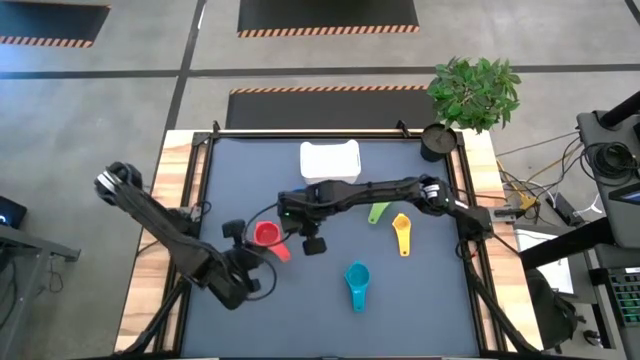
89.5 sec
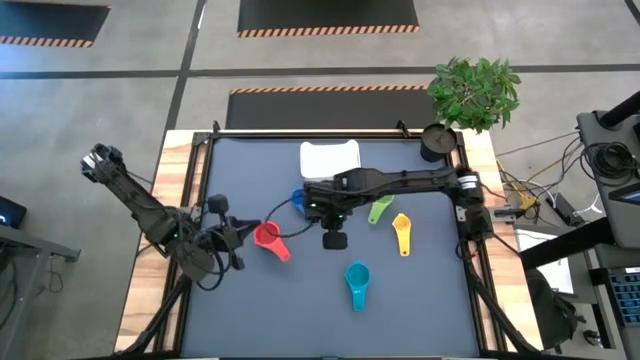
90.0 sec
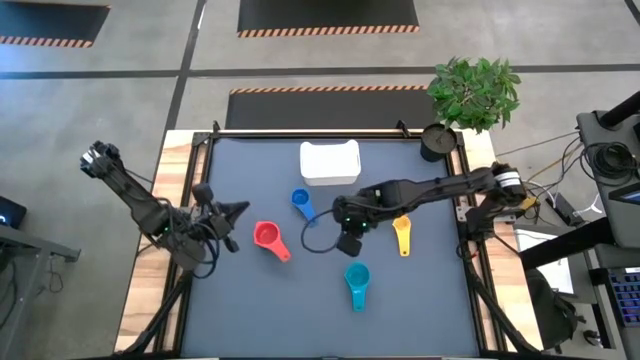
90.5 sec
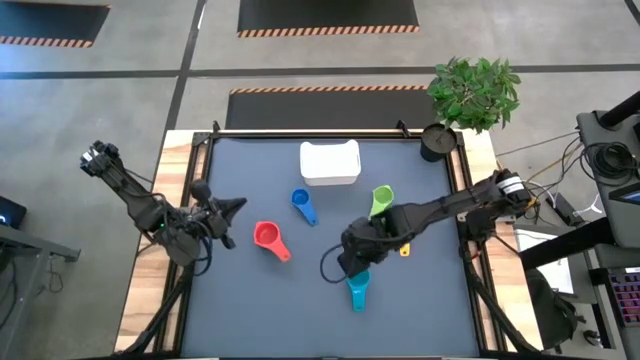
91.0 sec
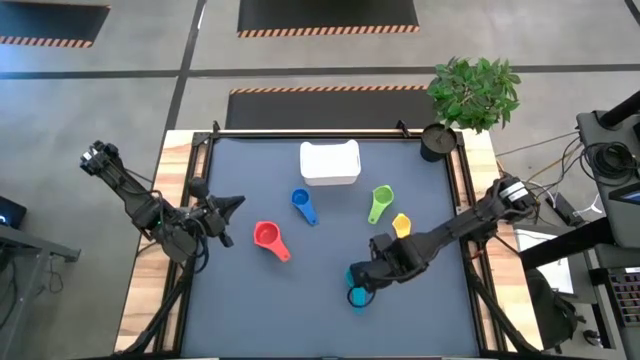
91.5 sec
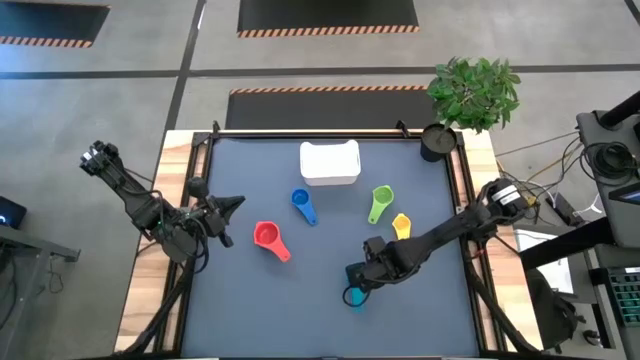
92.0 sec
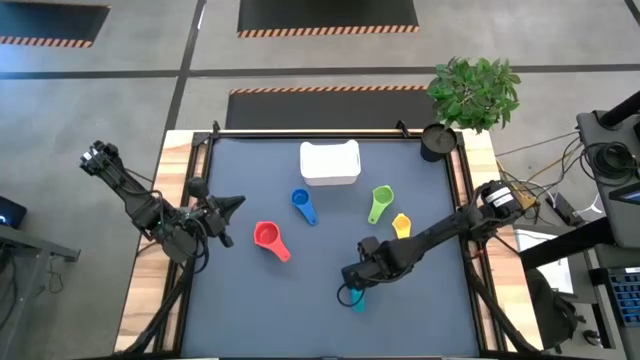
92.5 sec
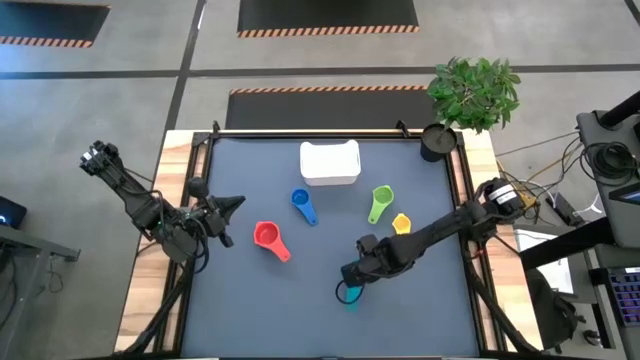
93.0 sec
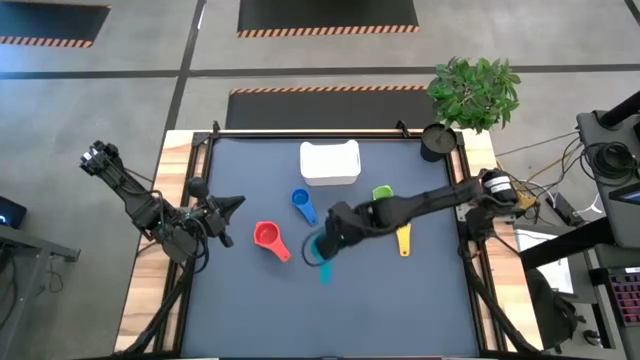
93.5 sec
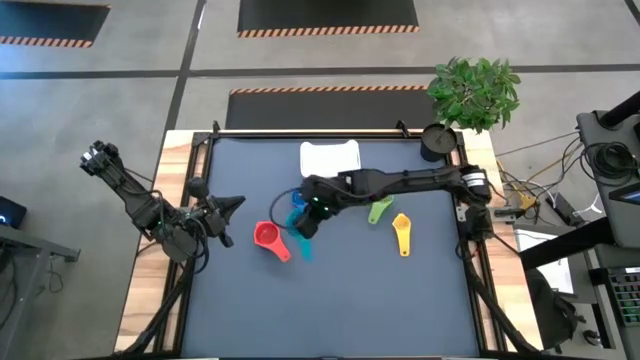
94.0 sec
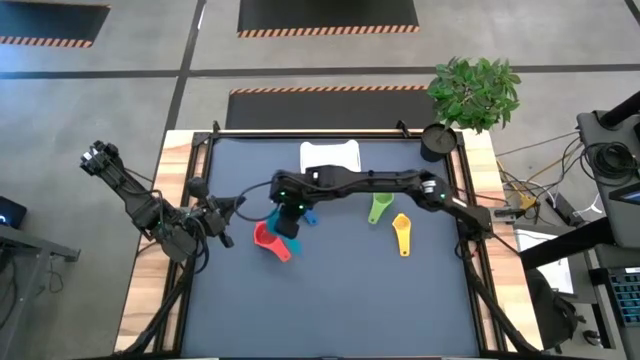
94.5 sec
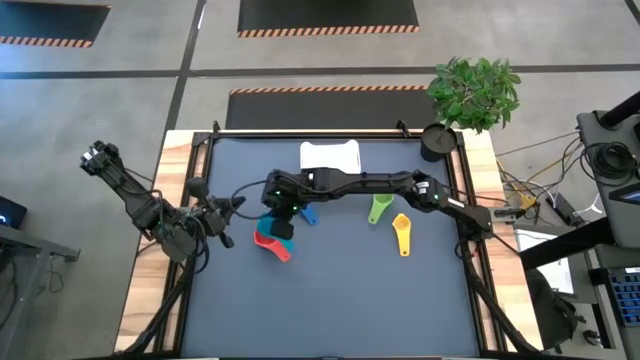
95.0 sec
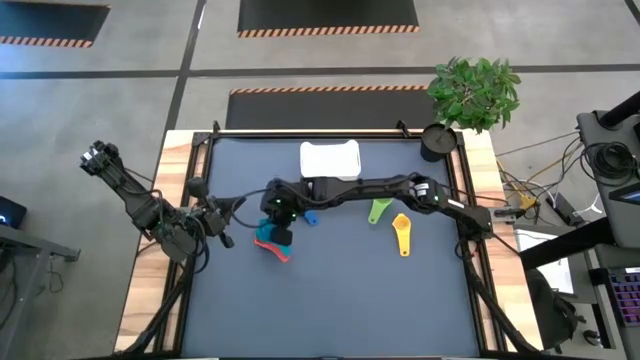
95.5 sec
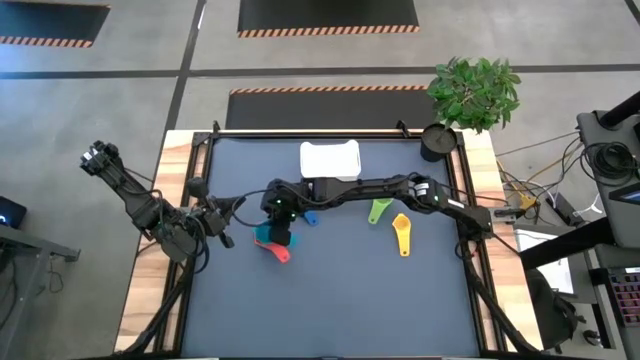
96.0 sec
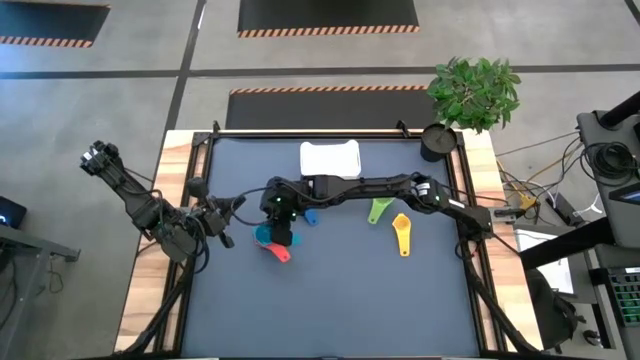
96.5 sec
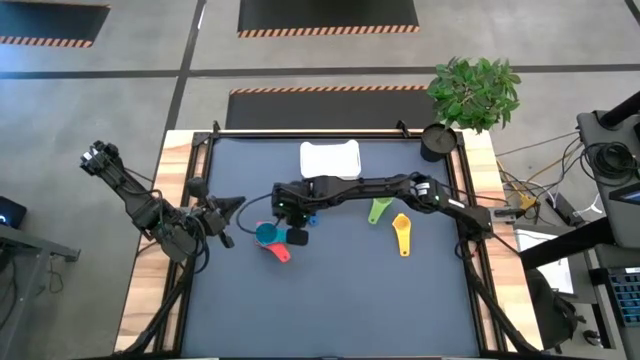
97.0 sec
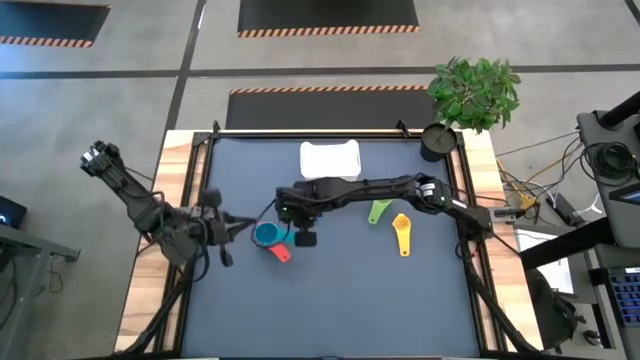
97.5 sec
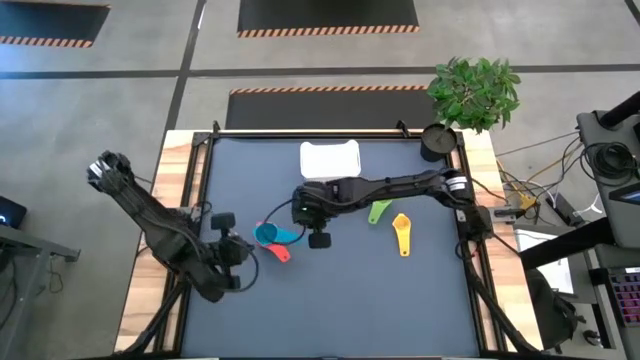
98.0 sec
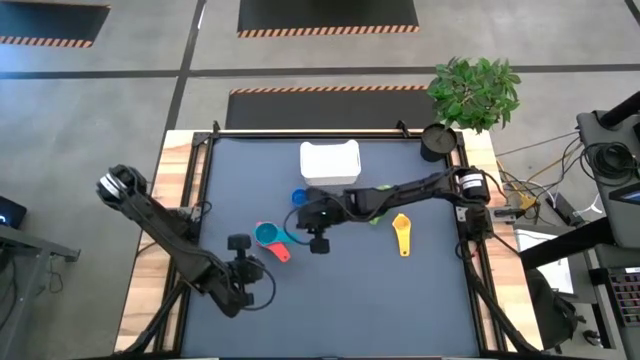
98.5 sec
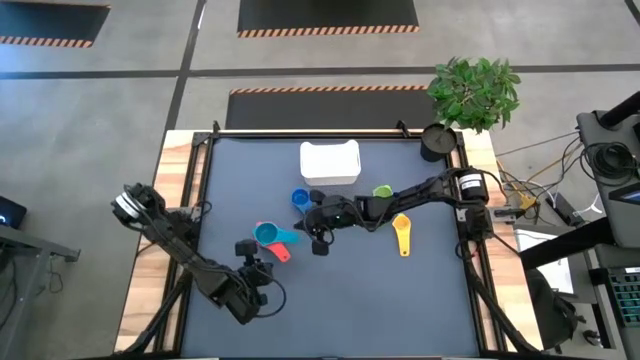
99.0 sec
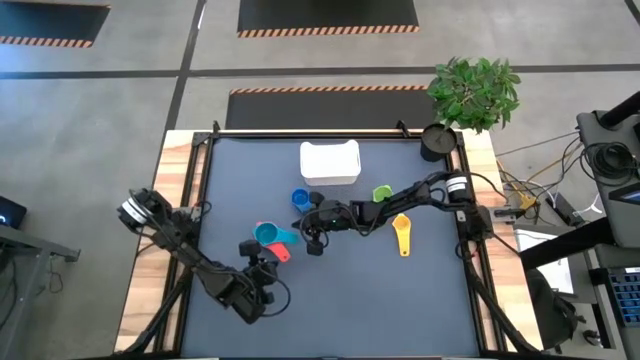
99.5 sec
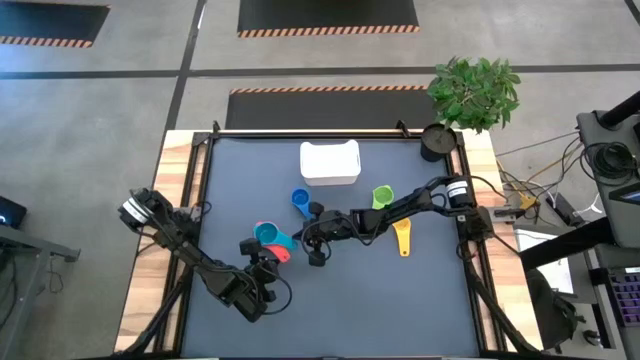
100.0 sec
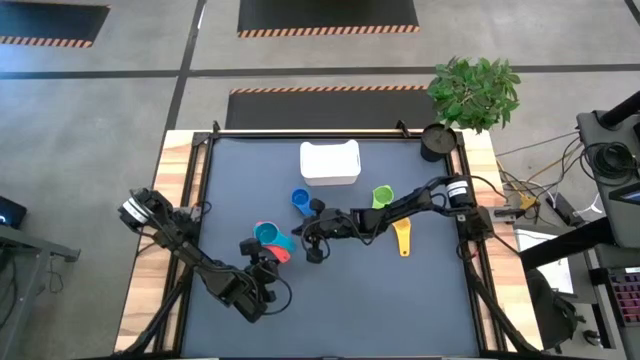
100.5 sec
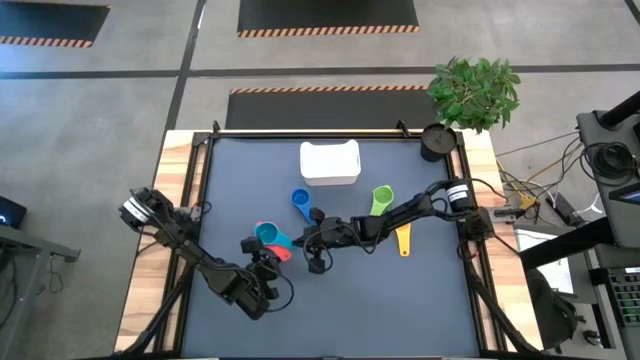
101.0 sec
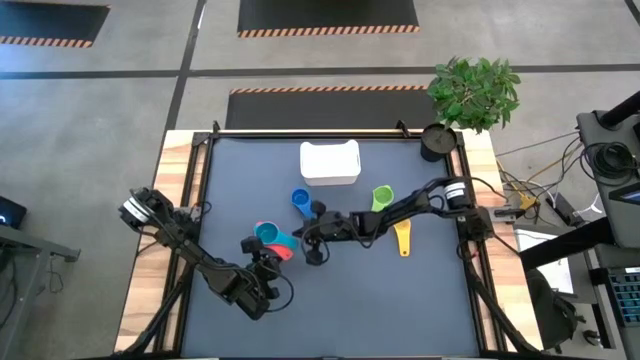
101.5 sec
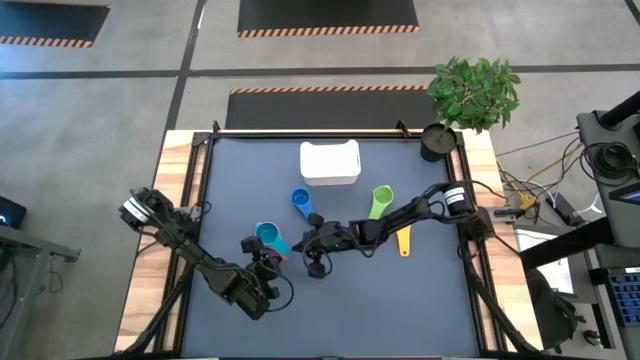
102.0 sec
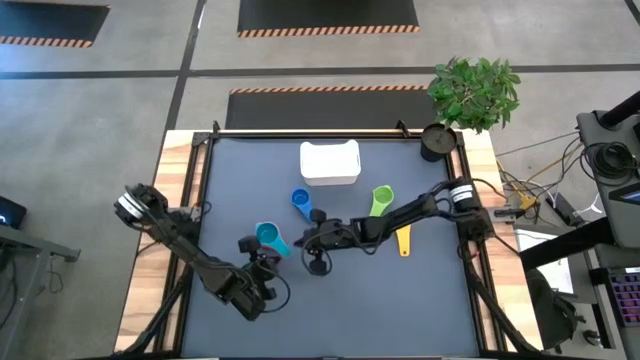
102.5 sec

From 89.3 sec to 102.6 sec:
Task: Nest measuring cups in basket
Stack the light blue measuring cup on top of the red measuring cup

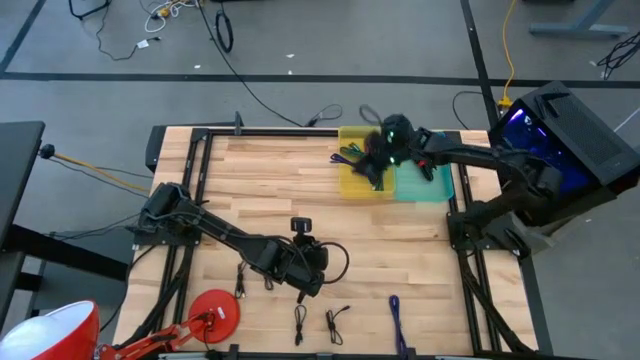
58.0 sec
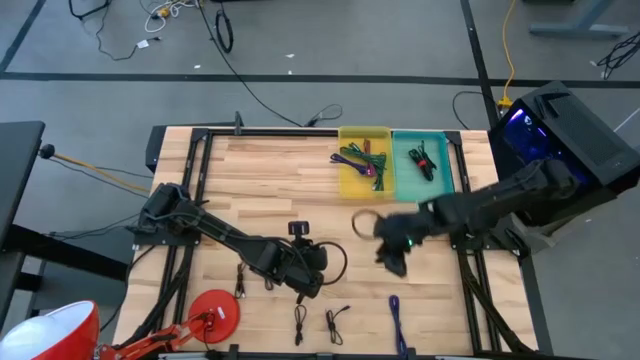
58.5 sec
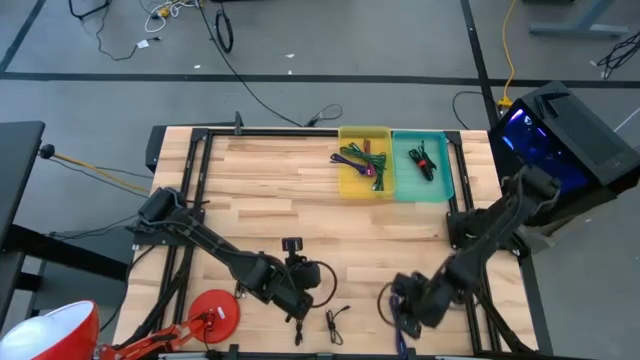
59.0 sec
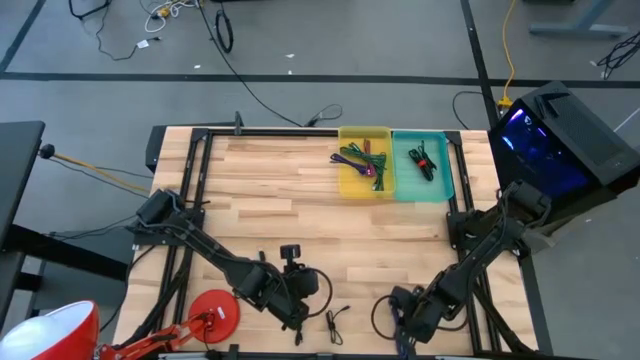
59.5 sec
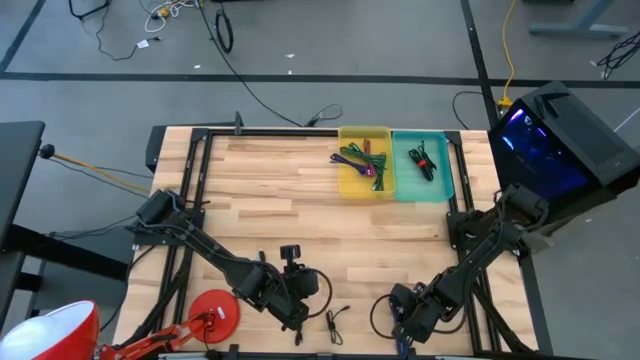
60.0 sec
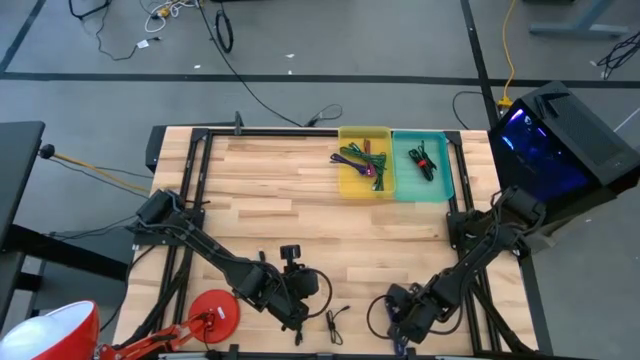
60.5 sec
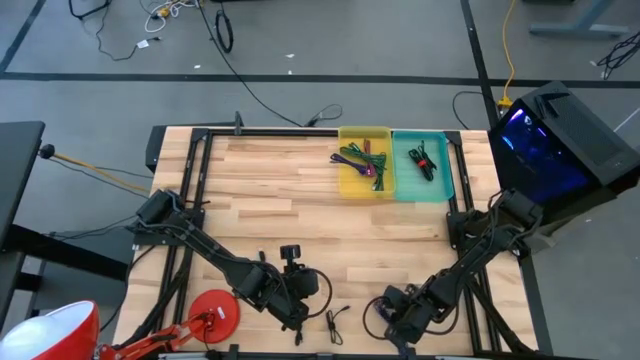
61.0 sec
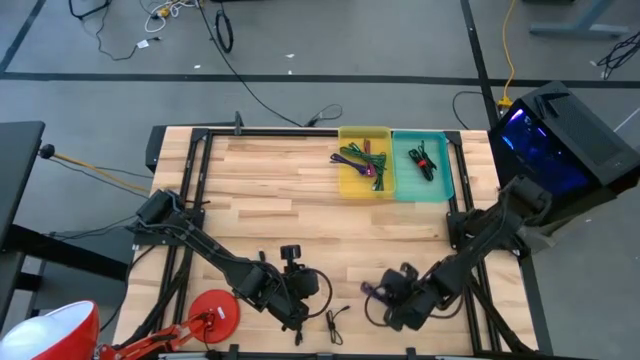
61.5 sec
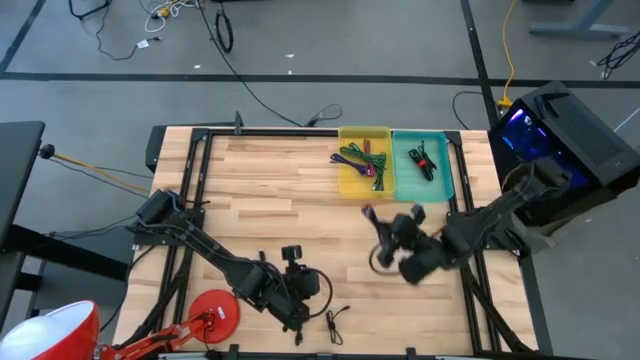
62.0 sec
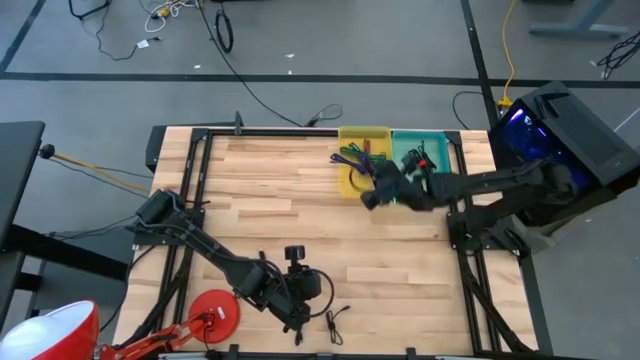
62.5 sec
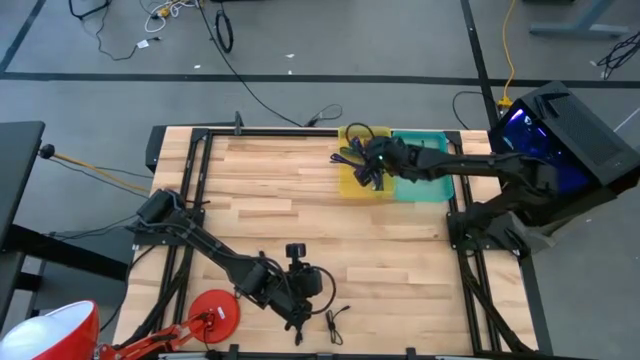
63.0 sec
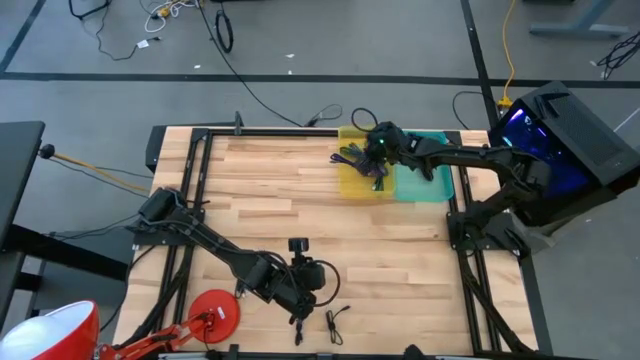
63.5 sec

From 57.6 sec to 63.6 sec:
Task: Pick & Place USB Port
Put the violet black charger cable into the yellow bin

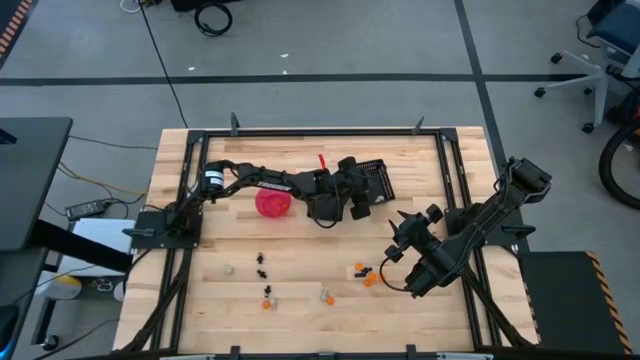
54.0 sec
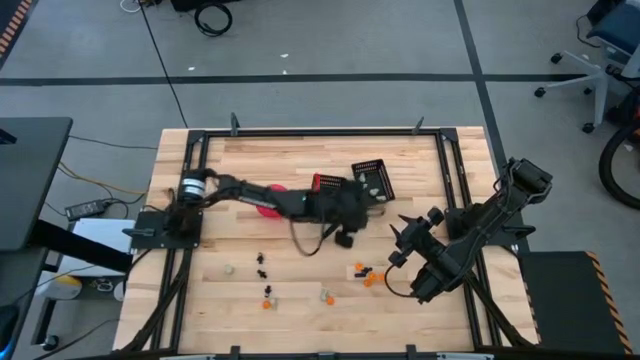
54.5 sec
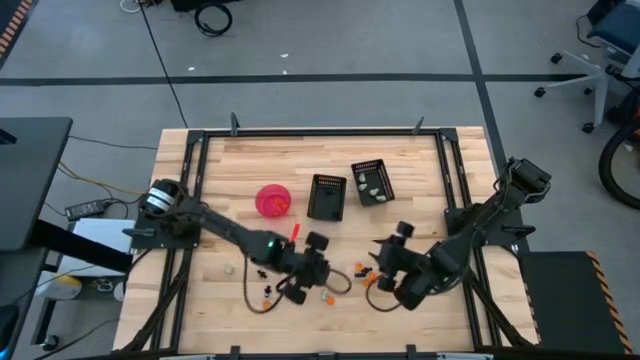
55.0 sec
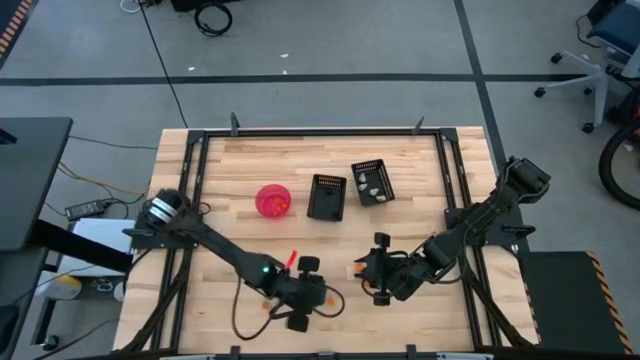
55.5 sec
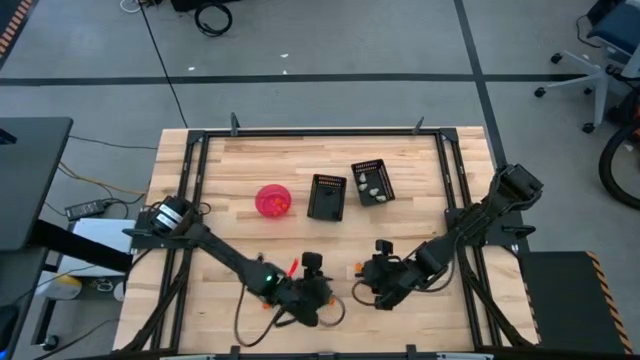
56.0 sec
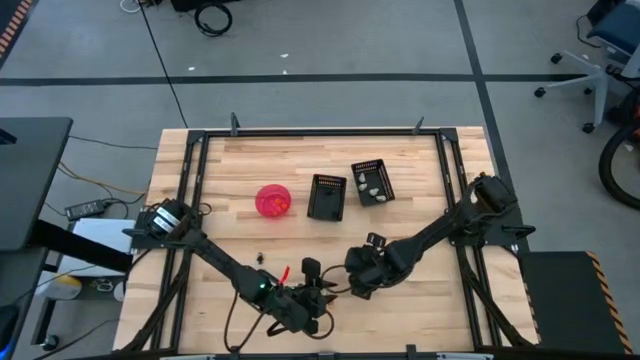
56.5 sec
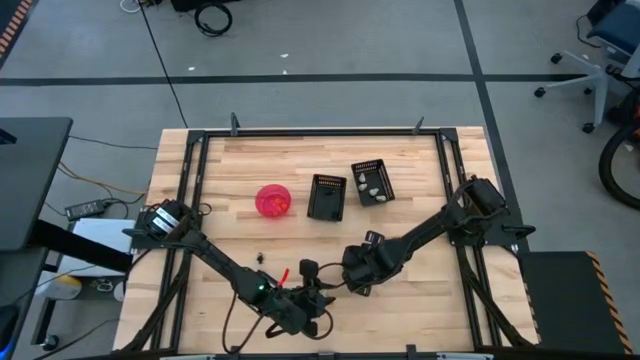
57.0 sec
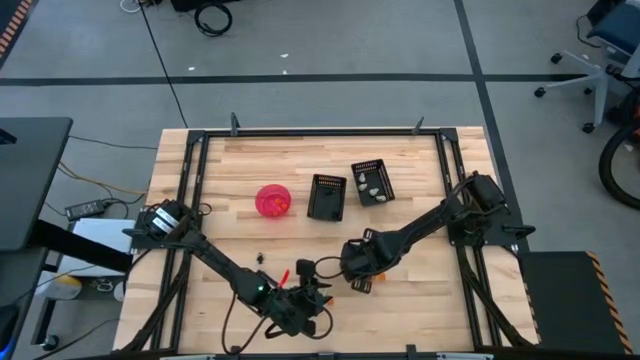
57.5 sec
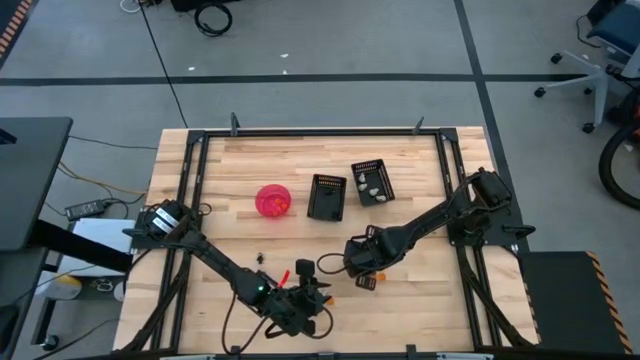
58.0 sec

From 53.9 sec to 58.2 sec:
Task: Sort Halloween decoration
Put the orange pumpkin toy into the red bowl
